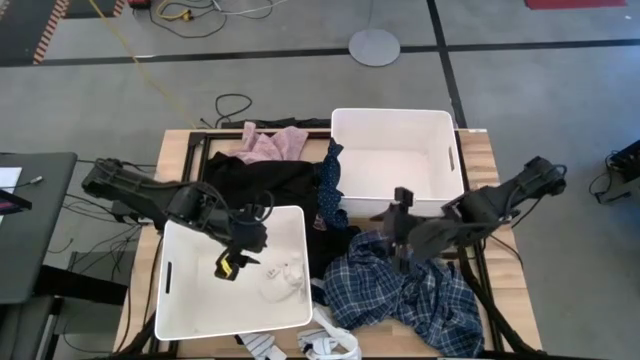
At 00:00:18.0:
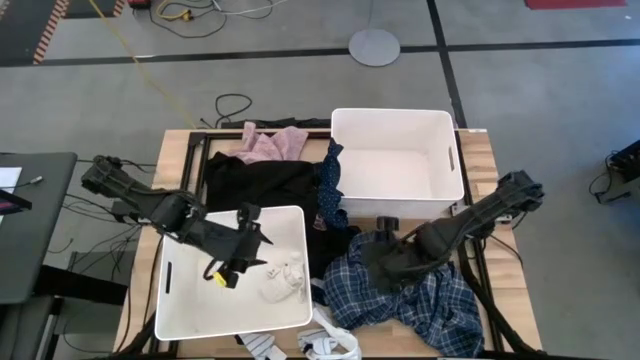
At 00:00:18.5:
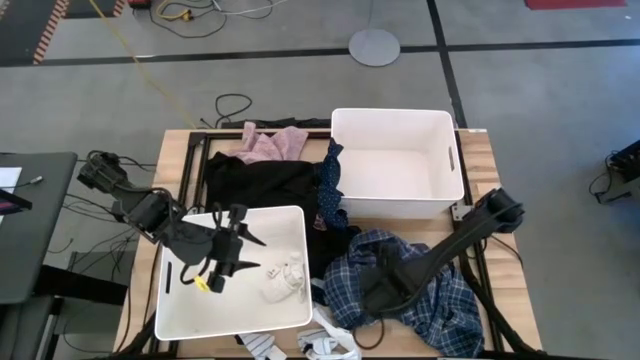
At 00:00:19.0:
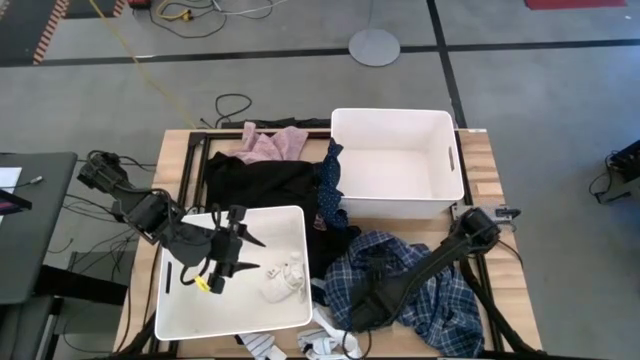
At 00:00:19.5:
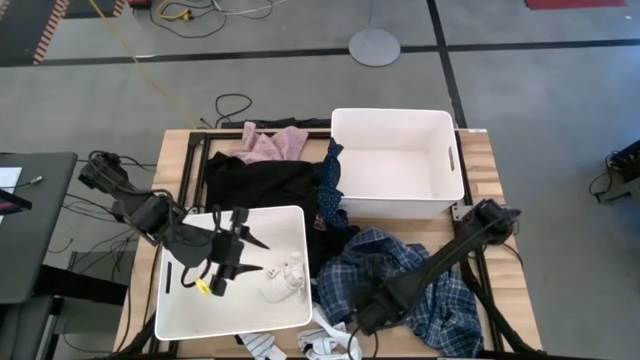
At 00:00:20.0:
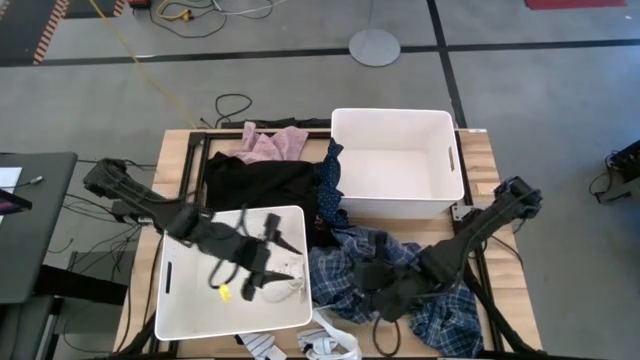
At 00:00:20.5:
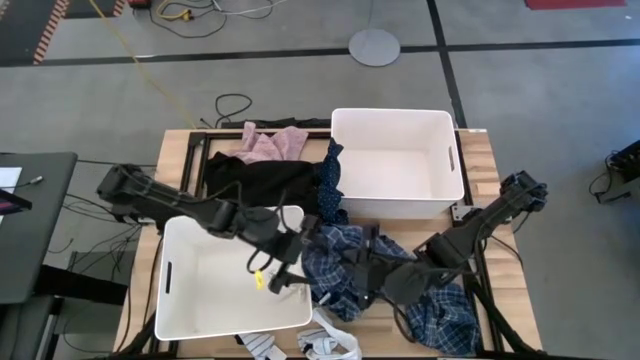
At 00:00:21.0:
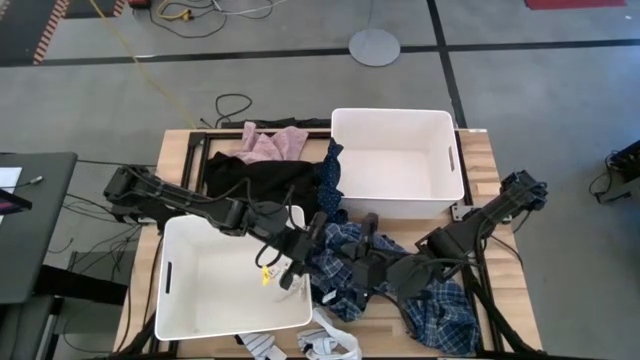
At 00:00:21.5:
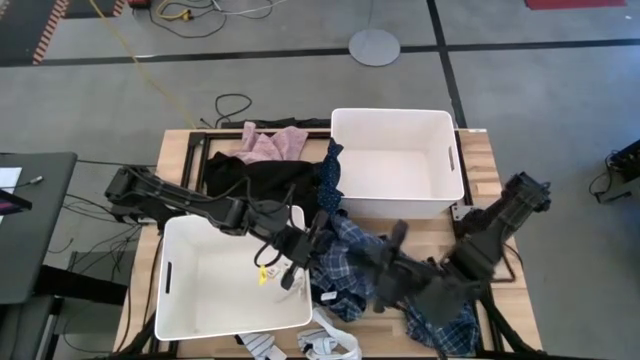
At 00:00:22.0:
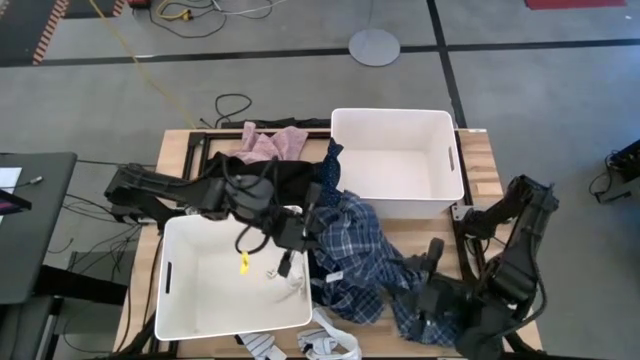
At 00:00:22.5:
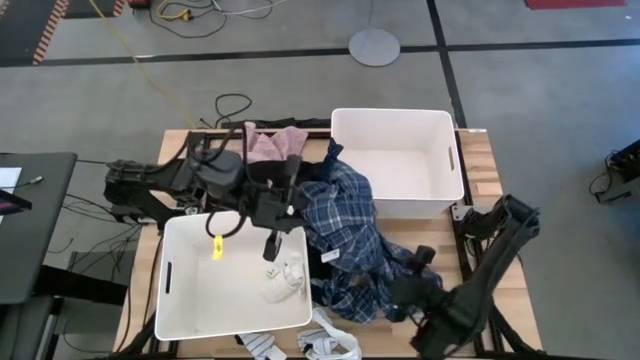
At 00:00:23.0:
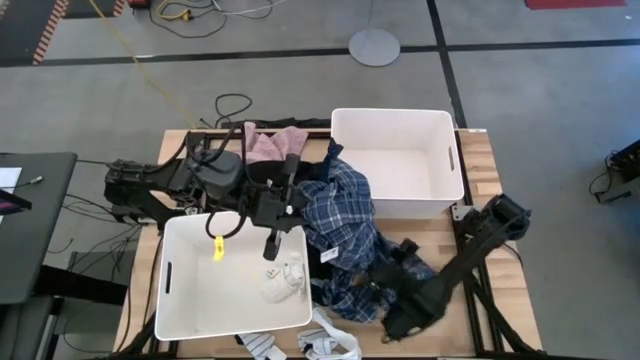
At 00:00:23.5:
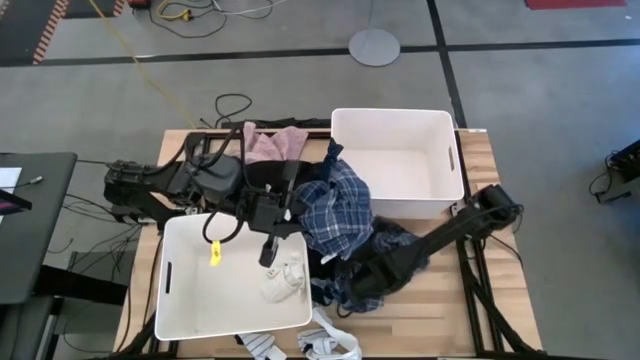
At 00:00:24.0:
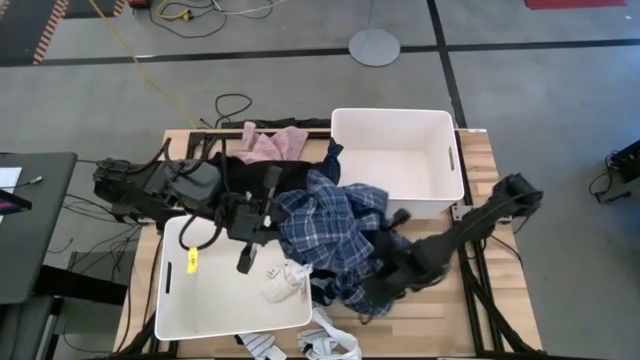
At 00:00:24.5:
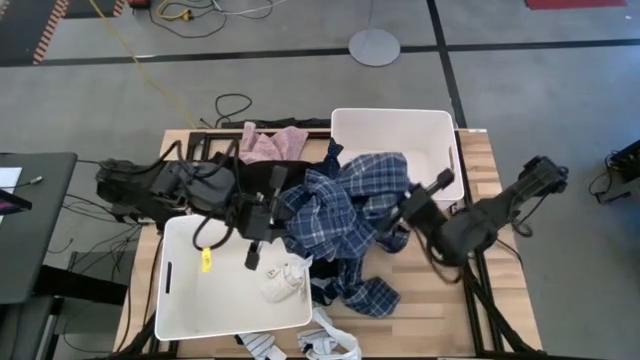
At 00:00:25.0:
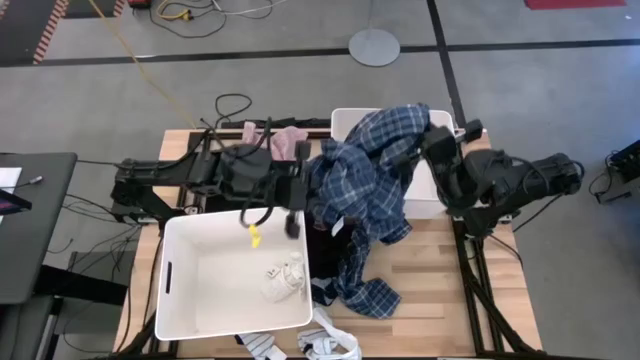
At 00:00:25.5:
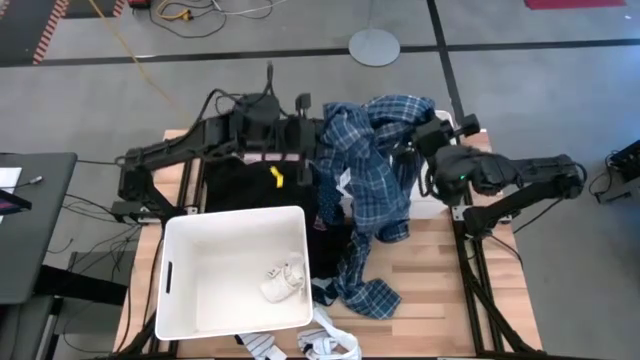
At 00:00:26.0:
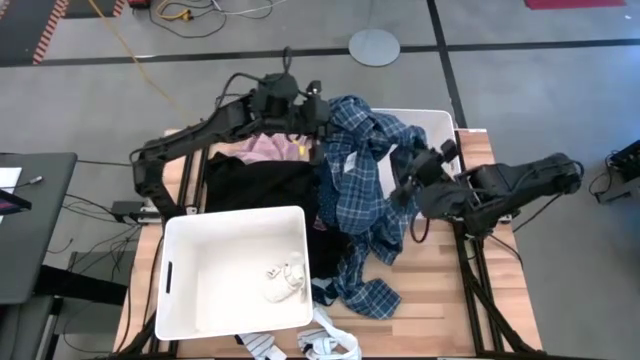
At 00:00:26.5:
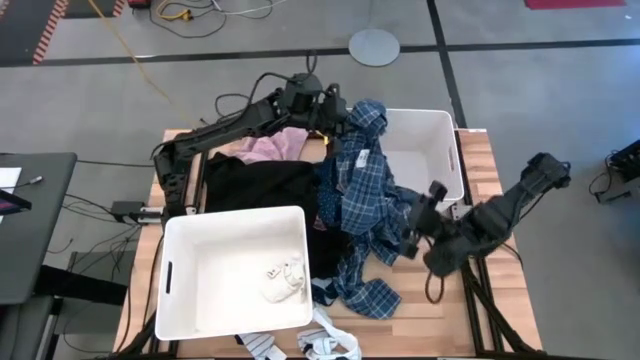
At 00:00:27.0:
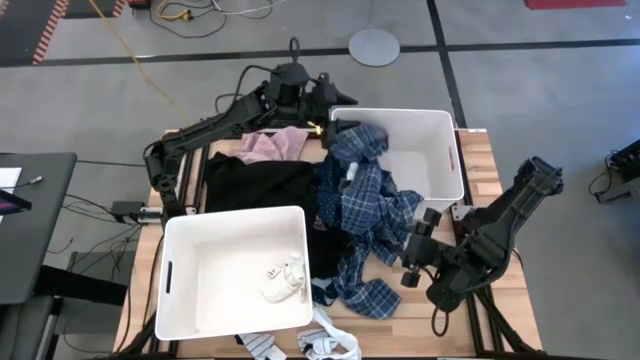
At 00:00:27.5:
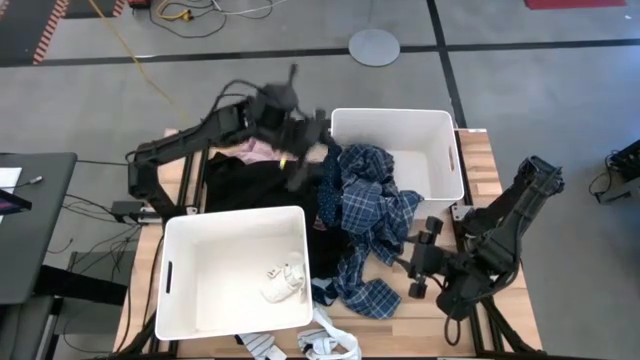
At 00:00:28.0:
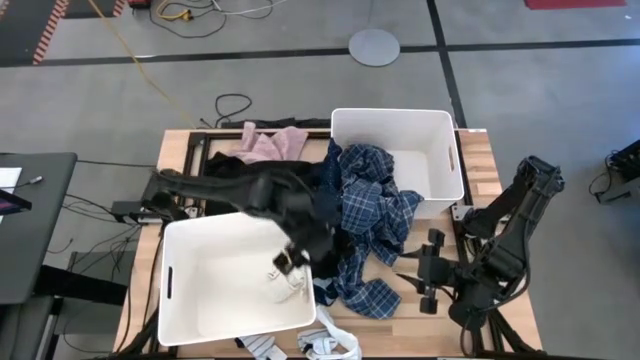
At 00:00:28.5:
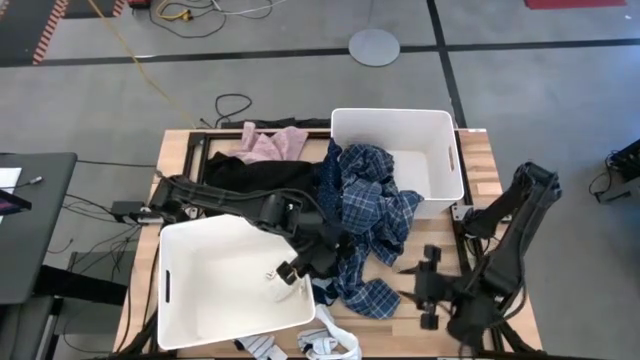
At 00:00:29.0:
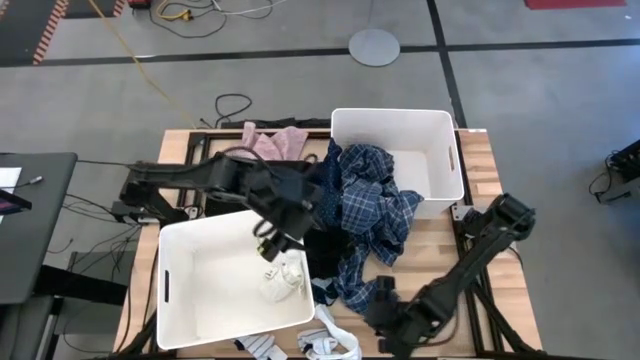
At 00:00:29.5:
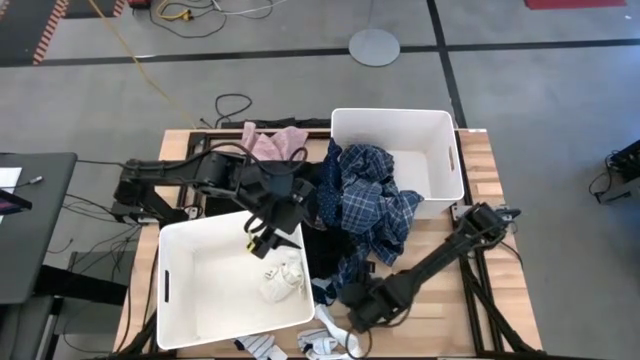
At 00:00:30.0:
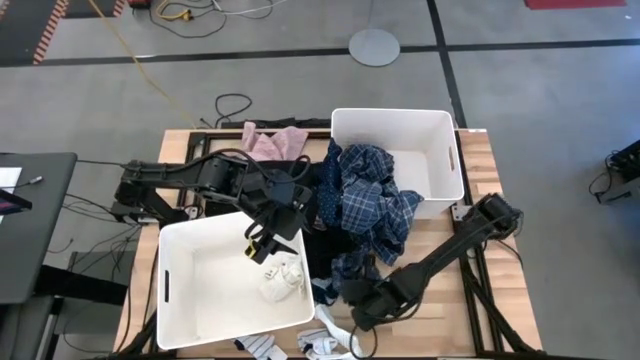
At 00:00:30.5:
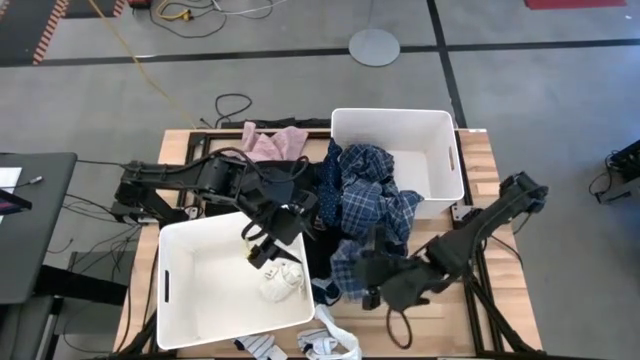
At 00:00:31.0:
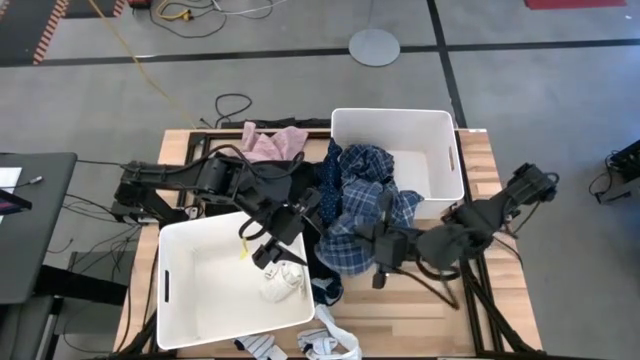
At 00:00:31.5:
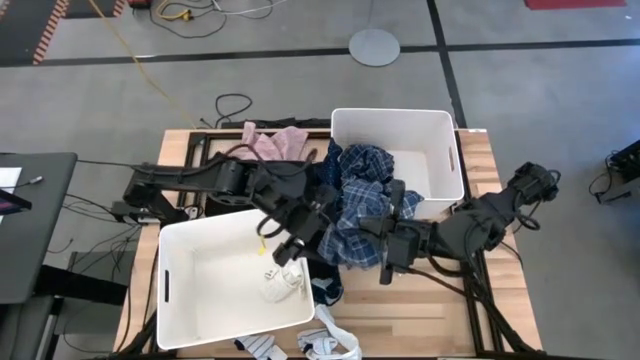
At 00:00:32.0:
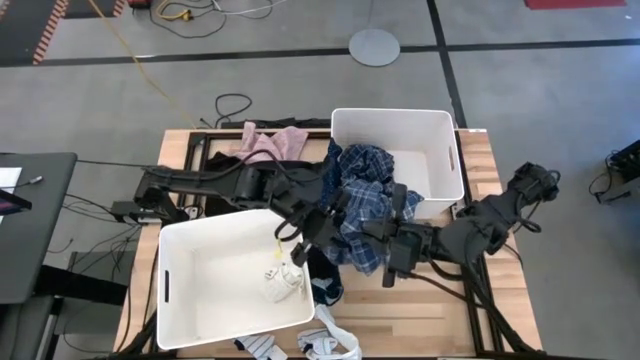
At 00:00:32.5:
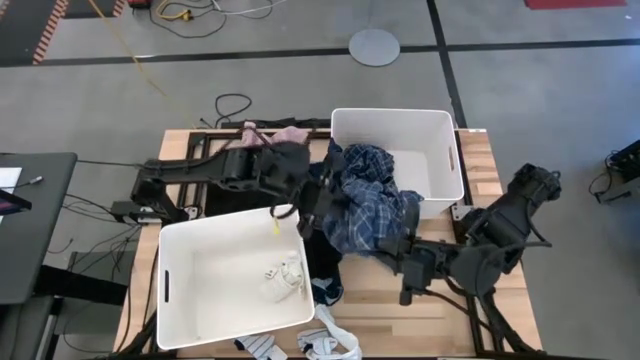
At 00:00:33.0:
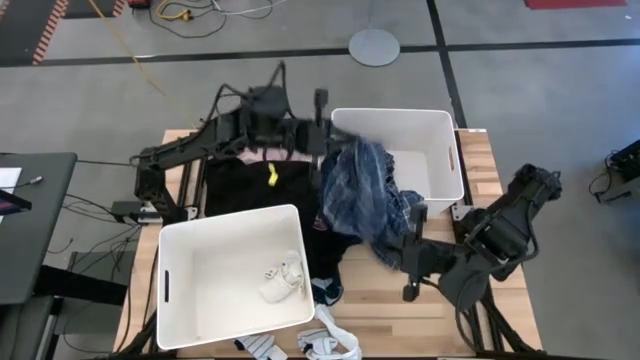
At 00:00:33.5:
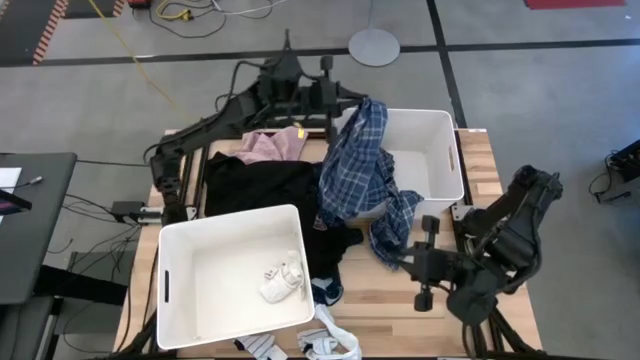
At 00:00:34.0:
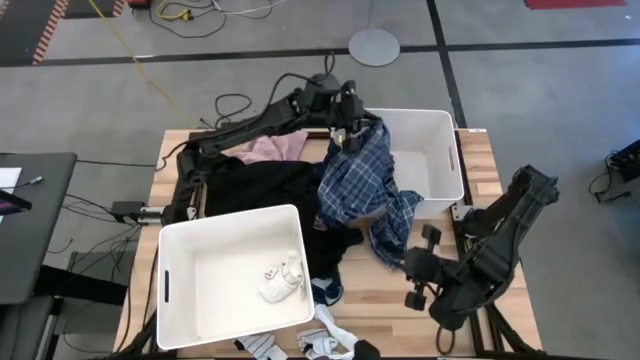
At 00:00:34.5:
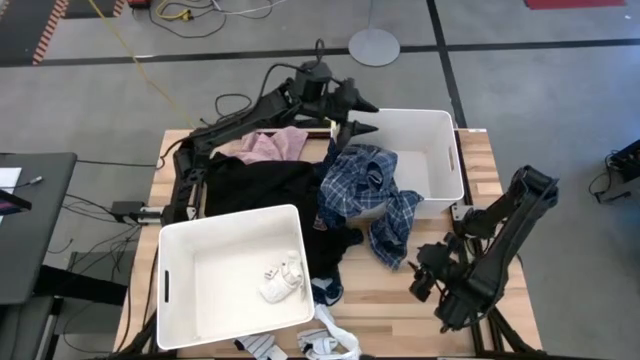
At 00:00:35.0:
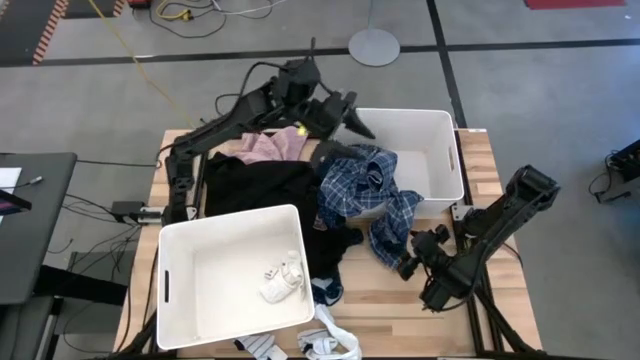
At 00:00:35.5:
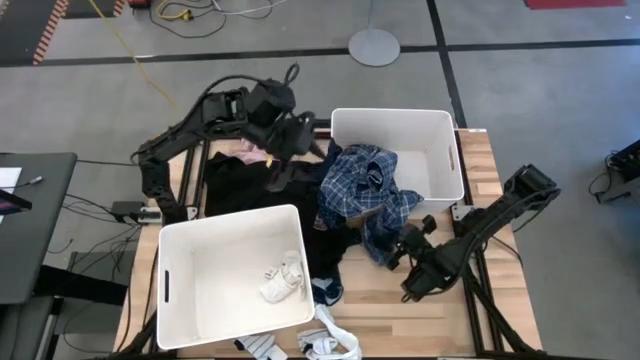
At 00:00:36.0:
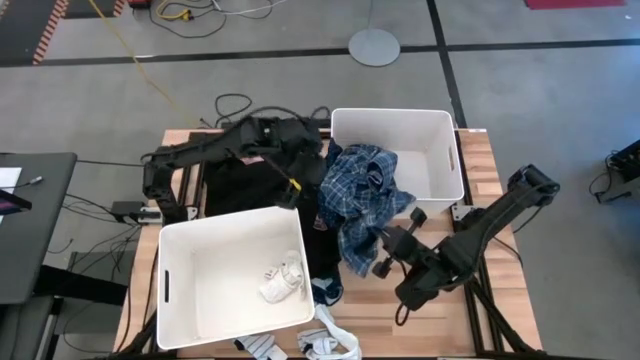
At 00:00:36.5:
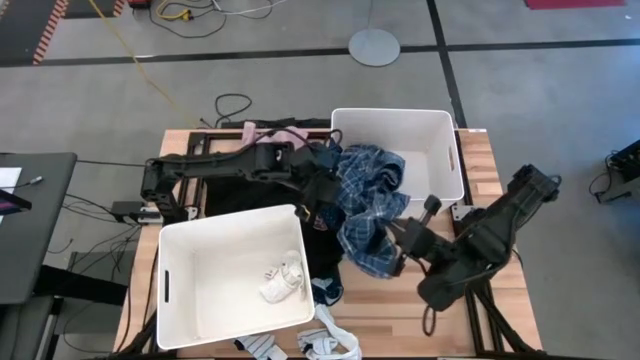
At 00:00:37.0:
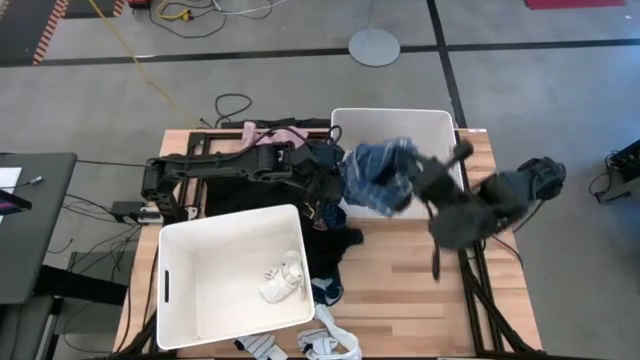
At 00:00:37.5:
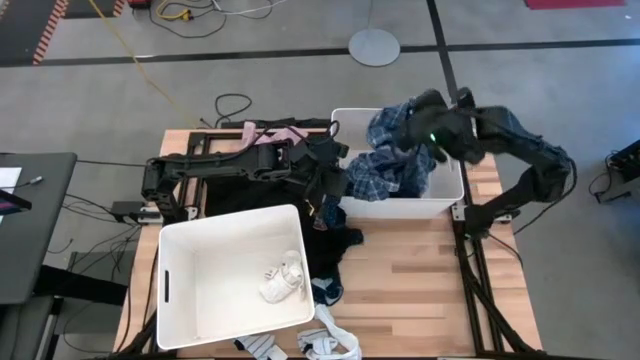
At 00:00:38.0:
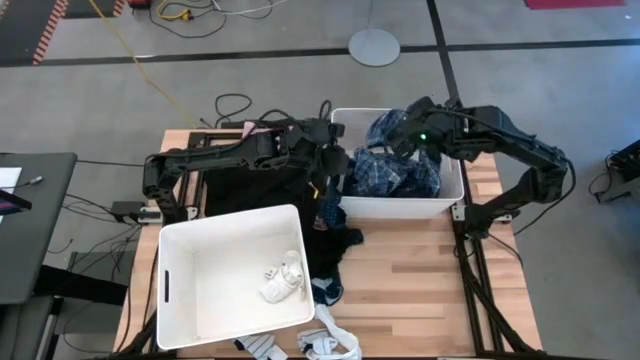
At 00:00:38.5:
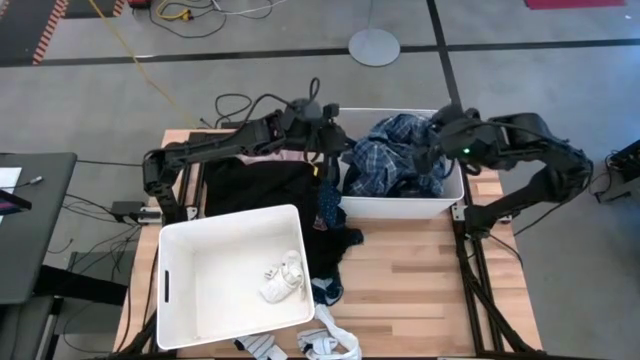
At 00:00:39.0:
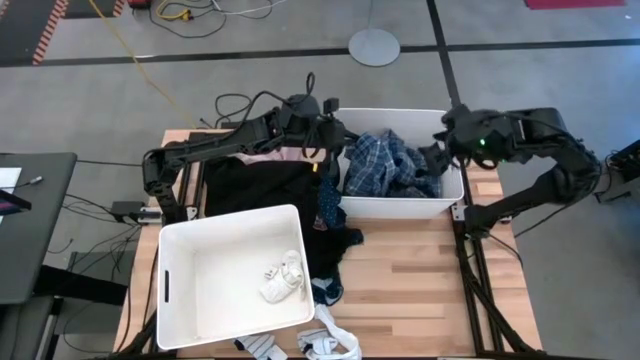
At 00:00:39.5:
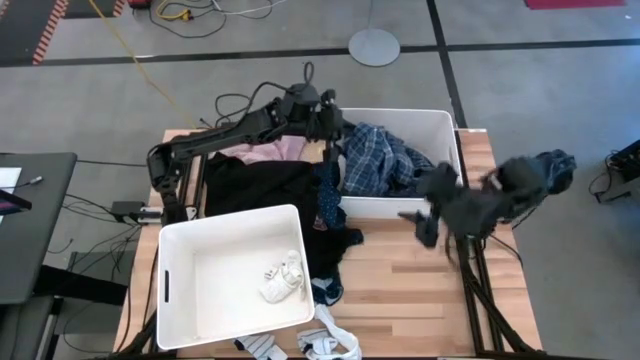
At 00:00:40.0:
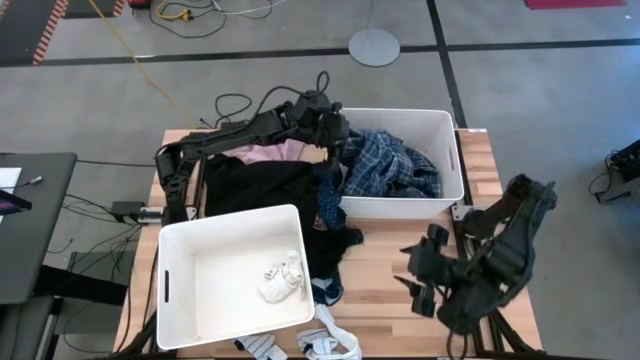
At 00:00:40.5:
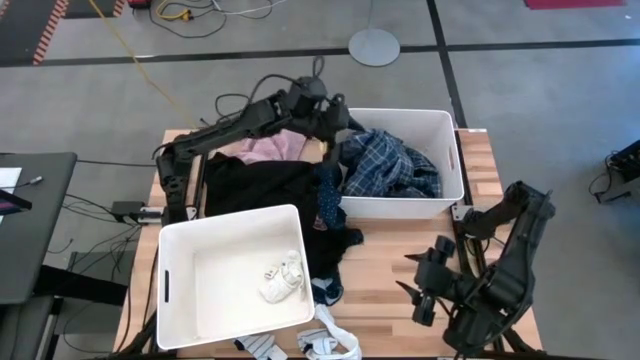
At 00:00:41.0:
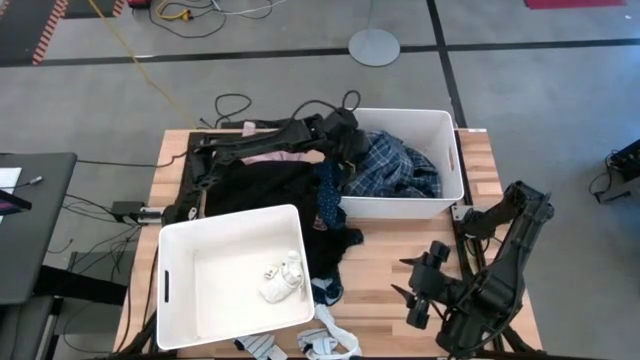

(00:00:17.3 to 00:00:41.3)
Task: Sort clothes
Put the blue pajamas into the top laundry bin
